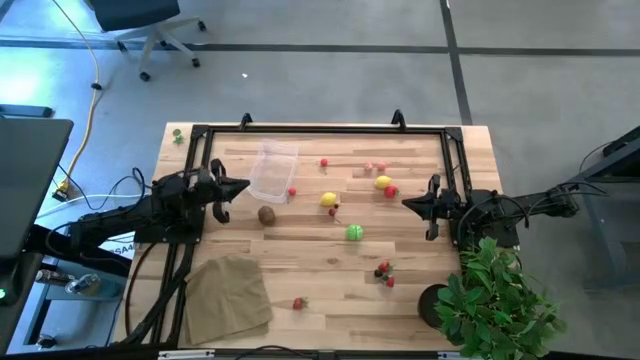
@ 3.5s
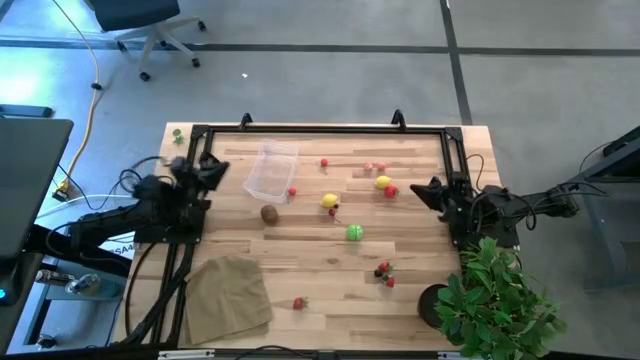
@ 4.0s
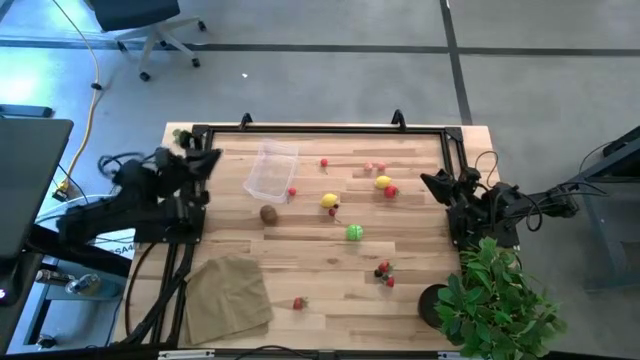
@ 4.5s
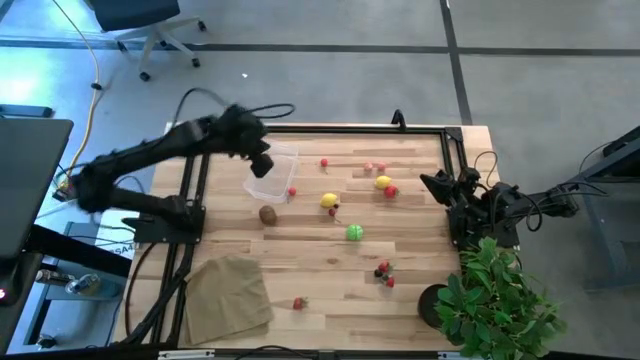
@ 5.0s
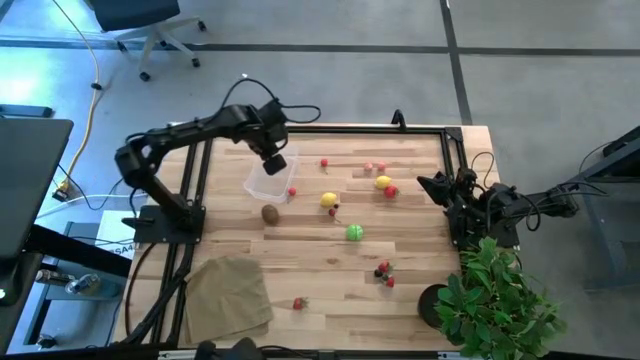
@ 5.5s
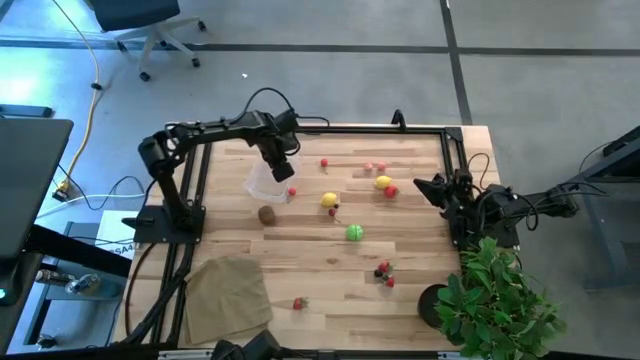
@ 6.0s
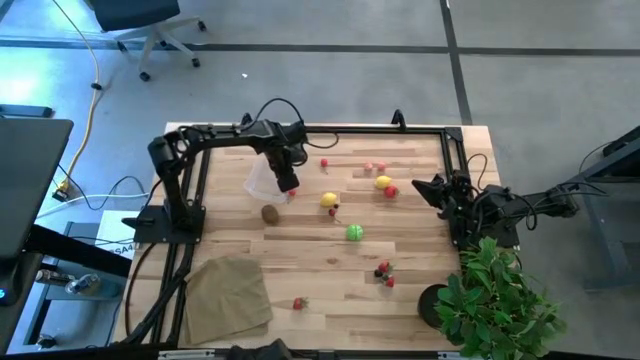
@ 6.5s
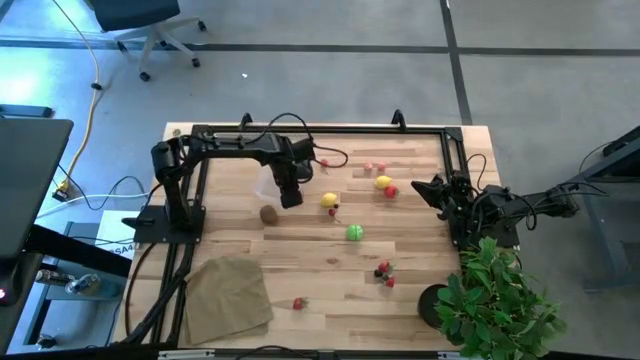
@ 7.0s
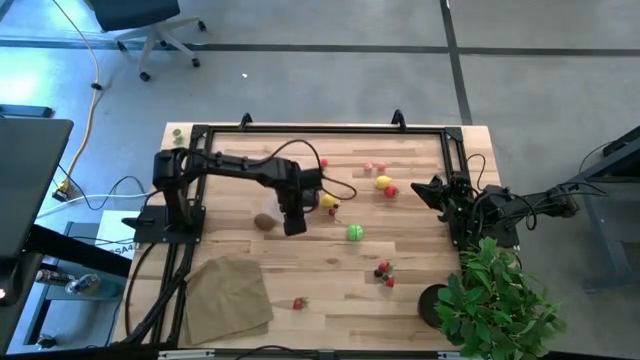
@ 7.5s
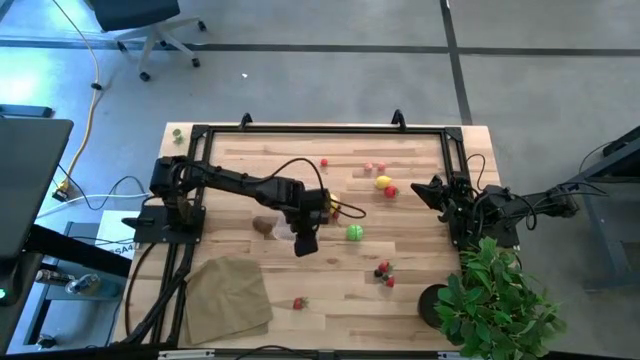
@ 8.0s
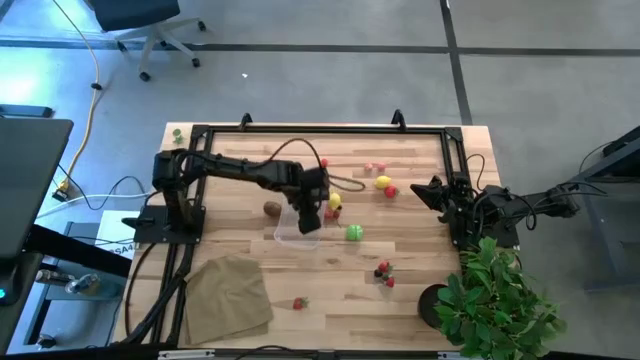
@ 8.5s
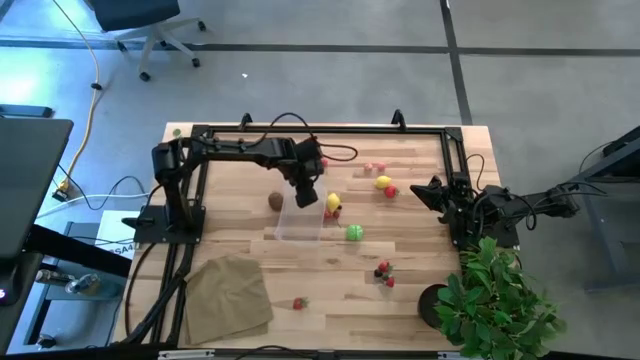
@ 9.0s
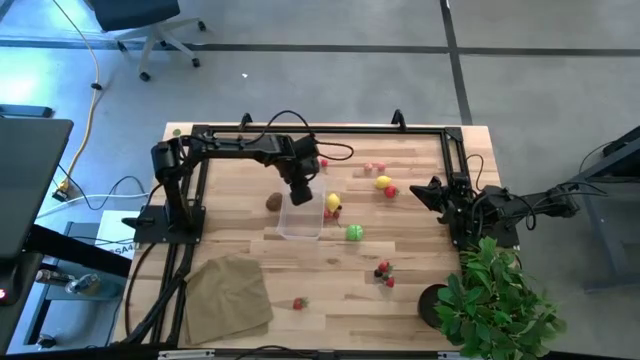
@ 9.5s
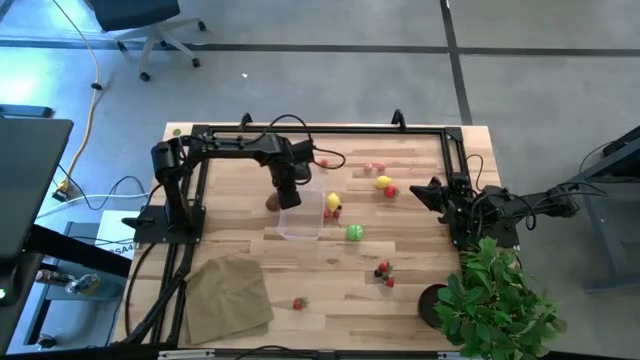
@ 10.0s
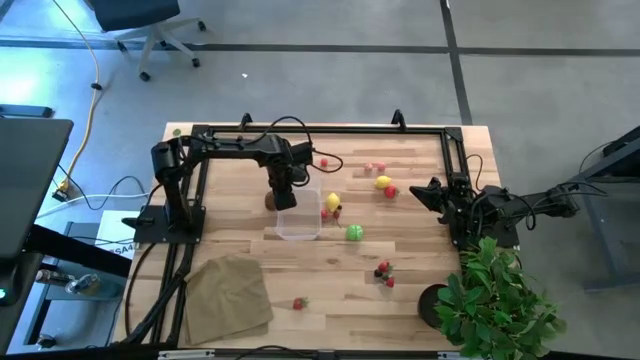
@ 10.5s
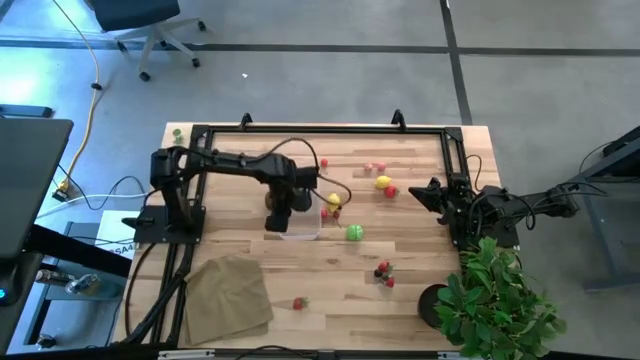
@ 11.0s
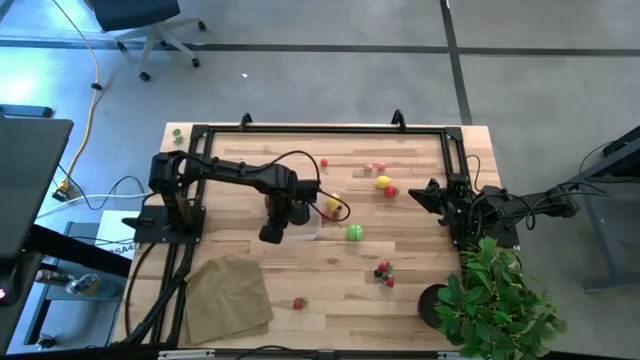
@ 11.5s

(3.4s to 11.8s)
Task: Pick and placing Produce into tupperware
Move the transparent bin to the center of the table

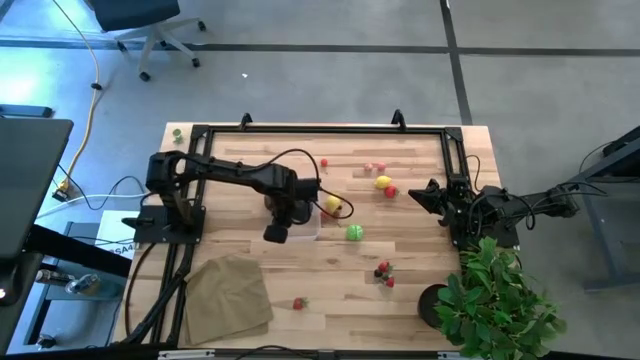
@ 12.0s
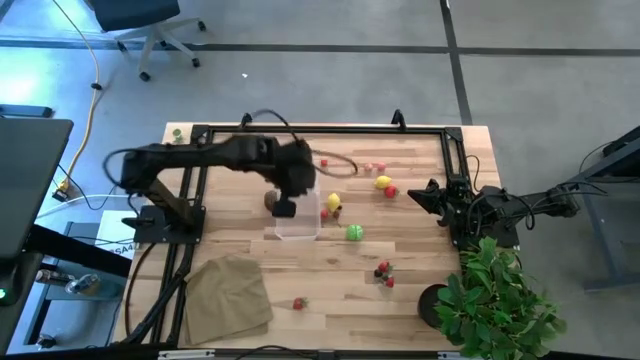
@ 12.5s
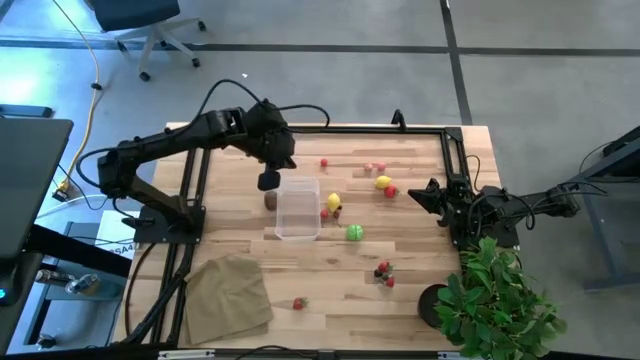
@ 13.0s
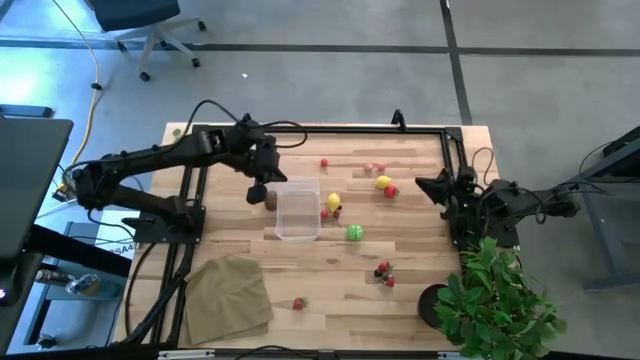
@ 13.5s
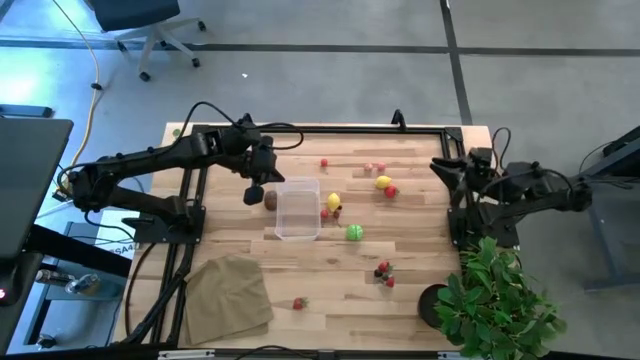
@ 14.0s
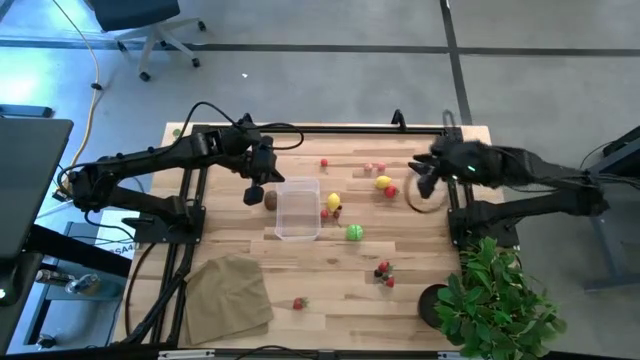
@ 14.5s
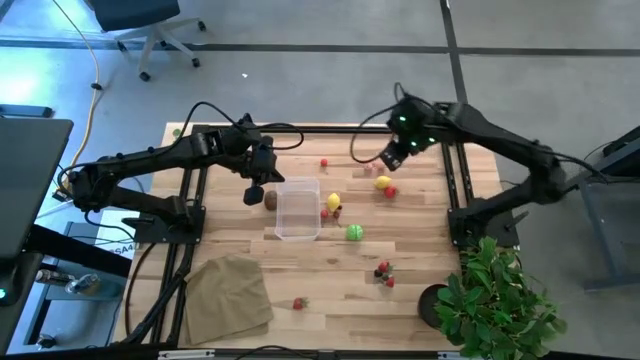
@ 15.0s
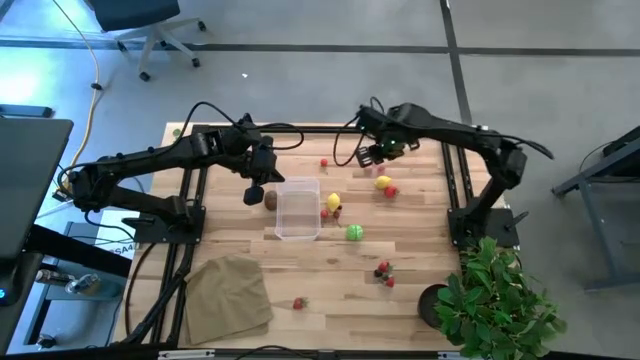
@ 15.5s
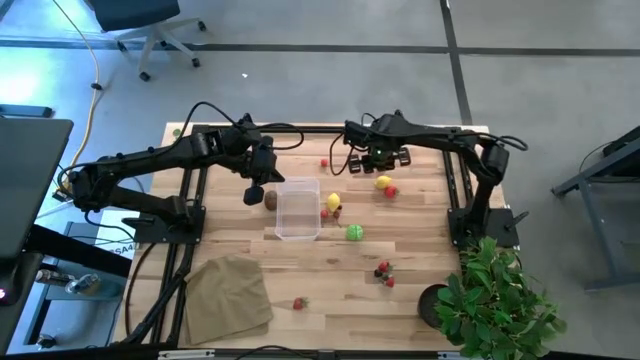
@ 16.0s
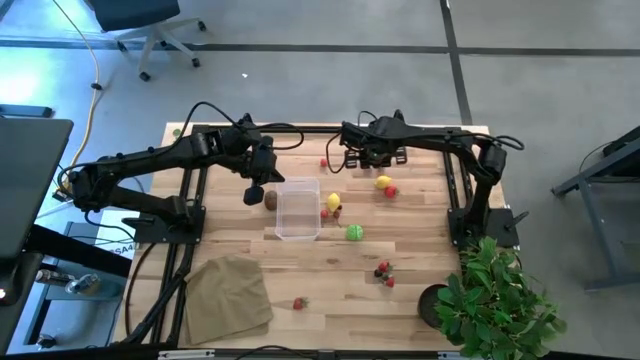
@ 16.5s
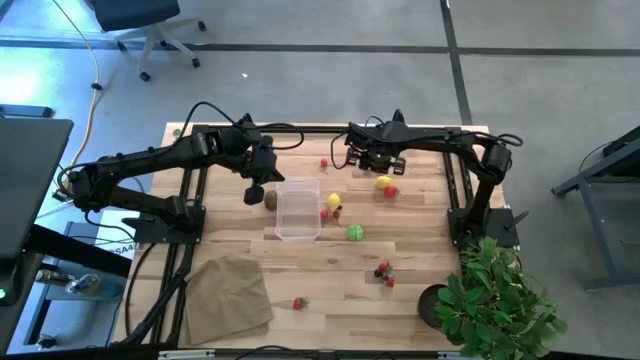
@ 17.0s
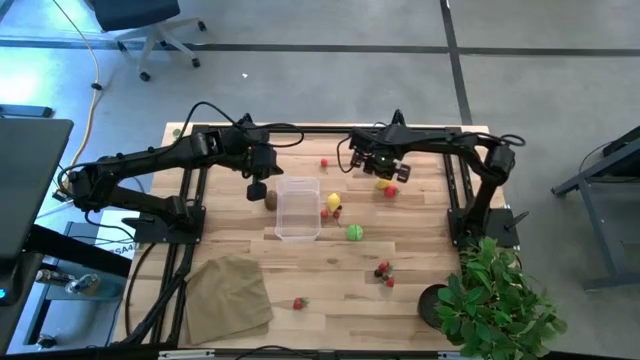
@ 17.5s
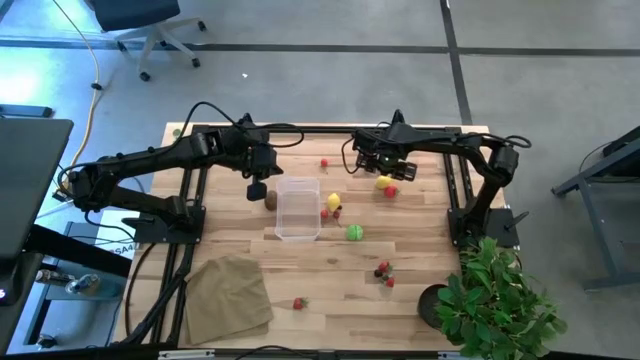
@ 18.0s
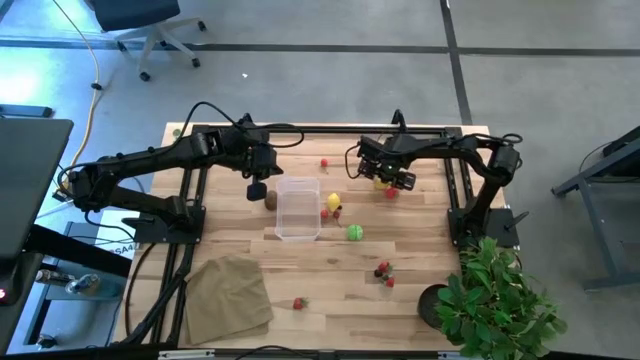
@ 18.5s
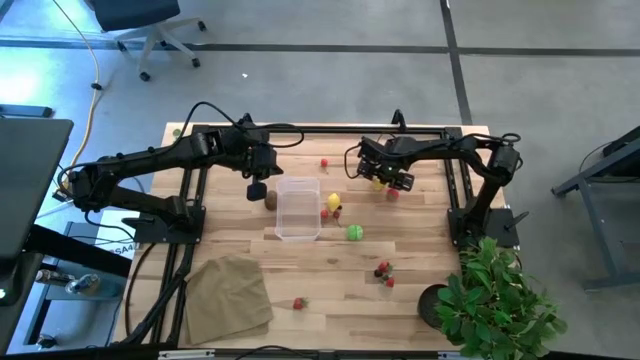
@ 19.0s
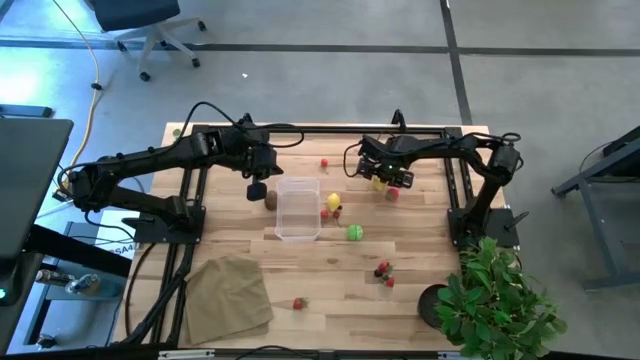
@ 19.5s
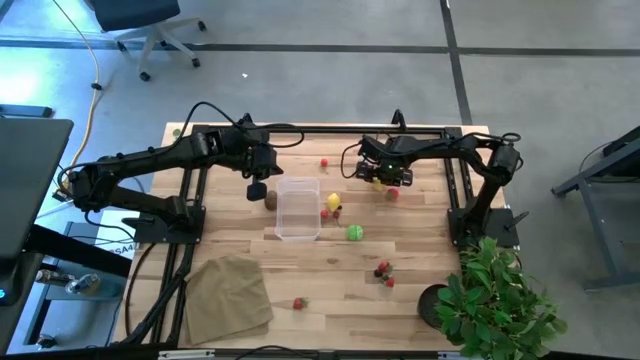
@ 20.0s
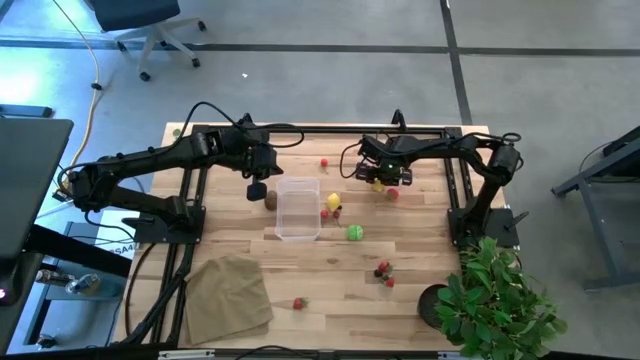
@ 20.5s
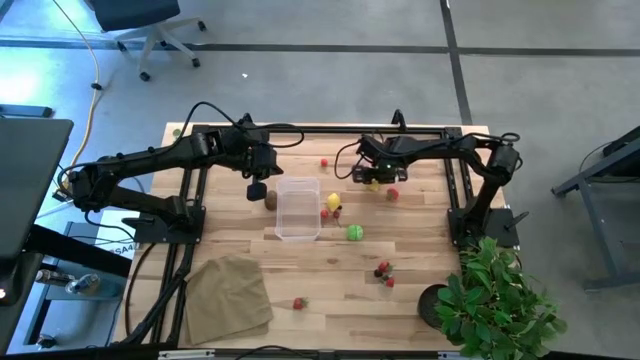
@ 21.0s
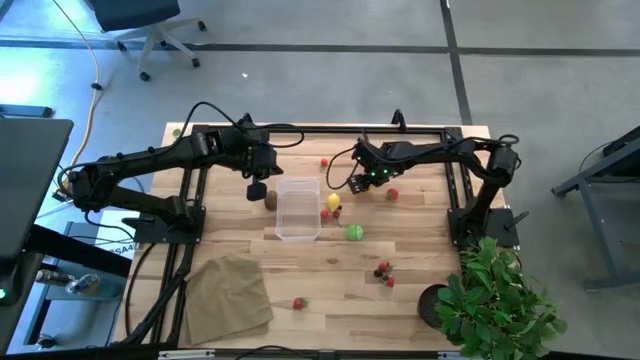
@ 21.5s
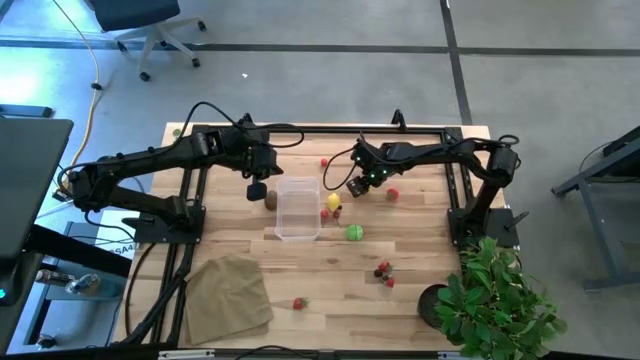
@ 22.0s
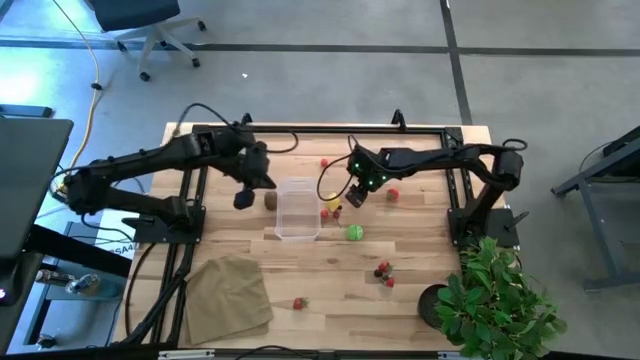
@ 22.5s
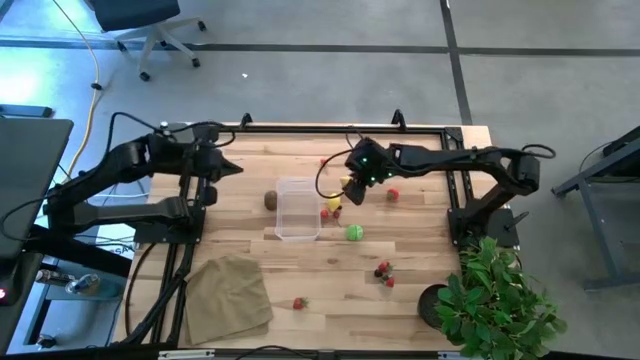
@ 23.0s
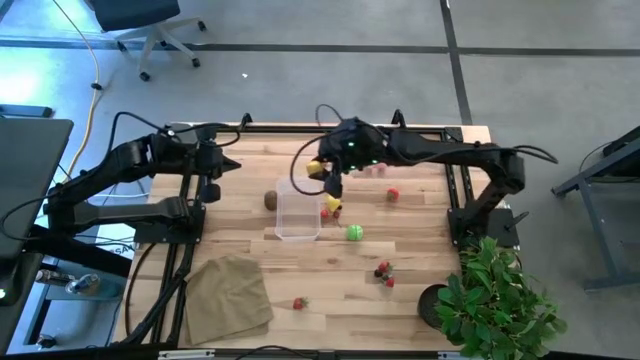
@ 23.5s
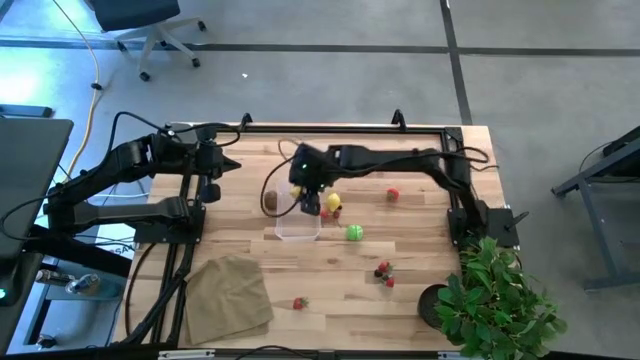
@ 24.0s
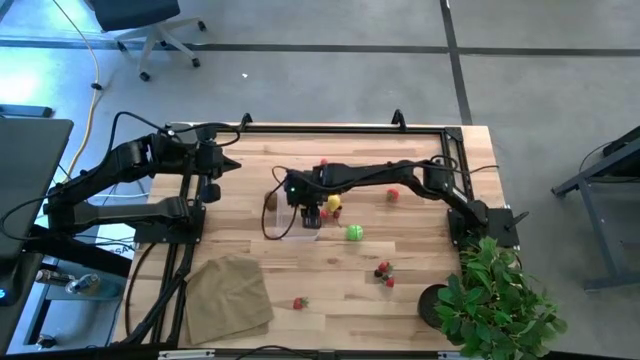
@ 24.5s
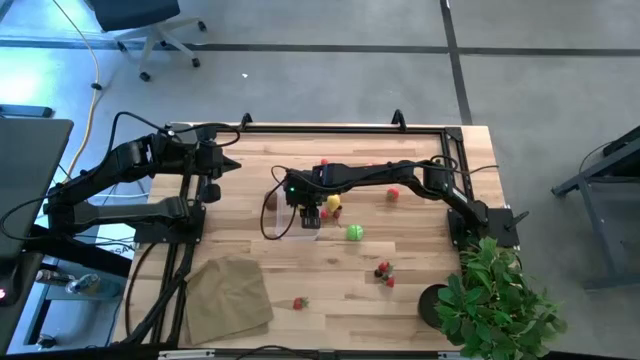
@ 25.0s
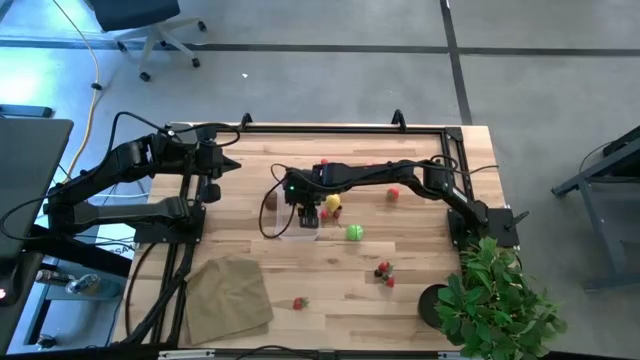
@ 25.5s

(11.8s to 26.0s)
Put the lemon into the transparent bin
